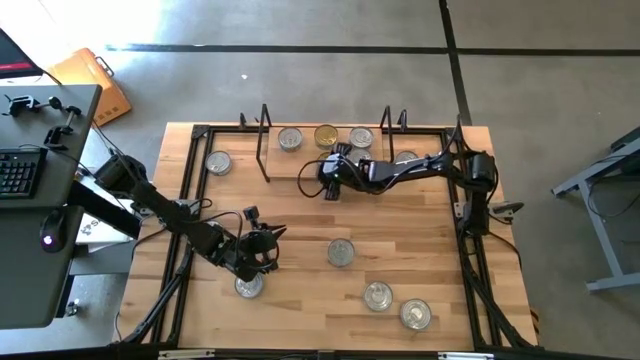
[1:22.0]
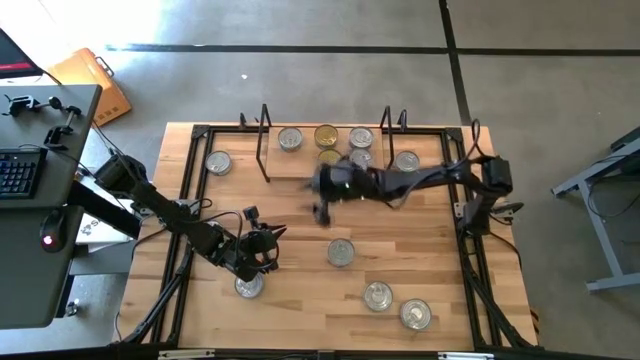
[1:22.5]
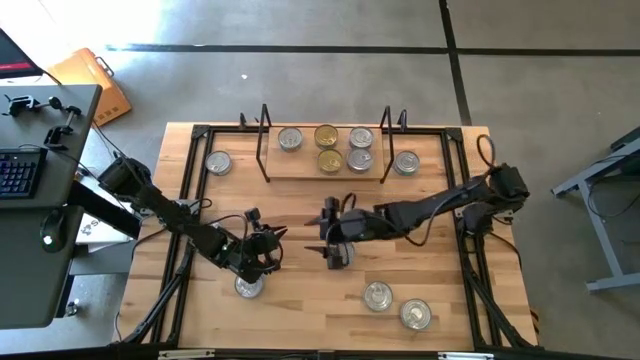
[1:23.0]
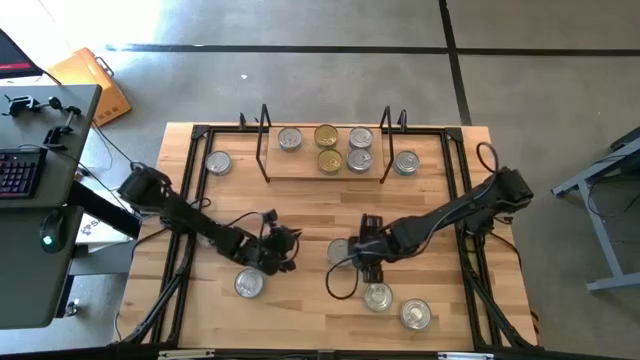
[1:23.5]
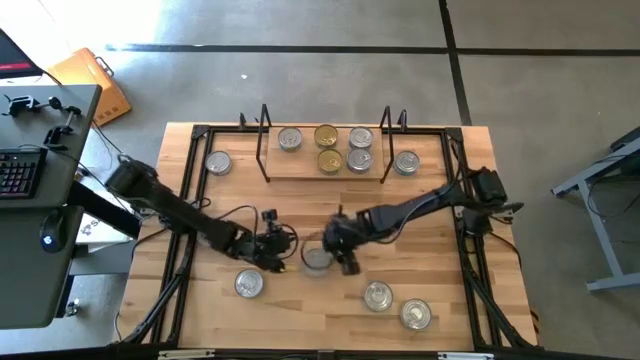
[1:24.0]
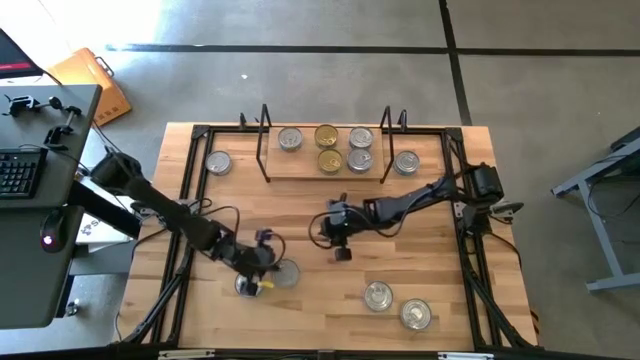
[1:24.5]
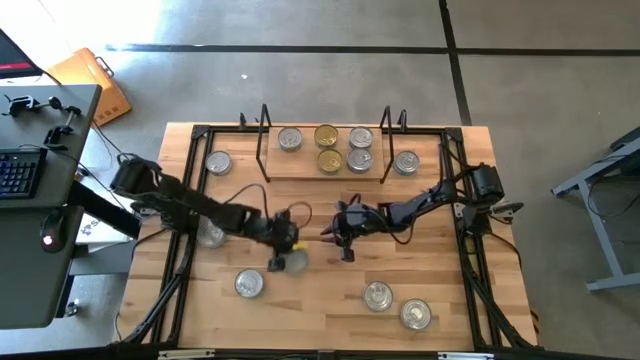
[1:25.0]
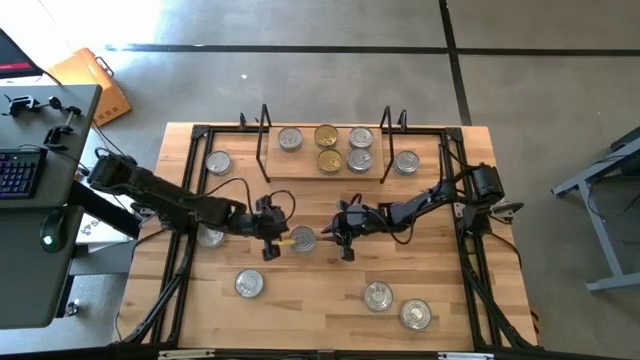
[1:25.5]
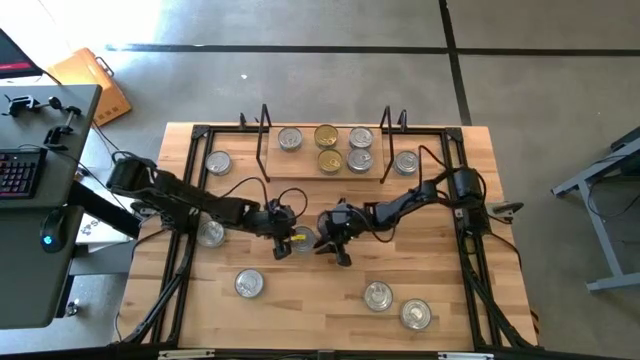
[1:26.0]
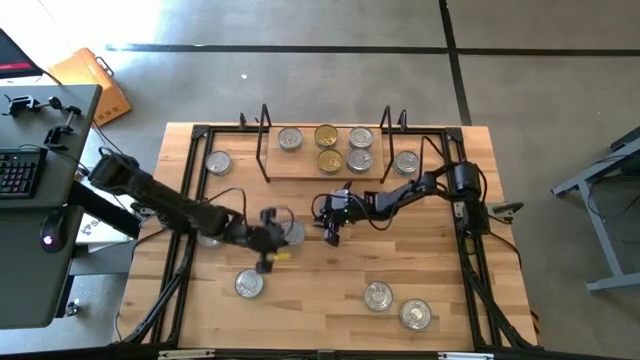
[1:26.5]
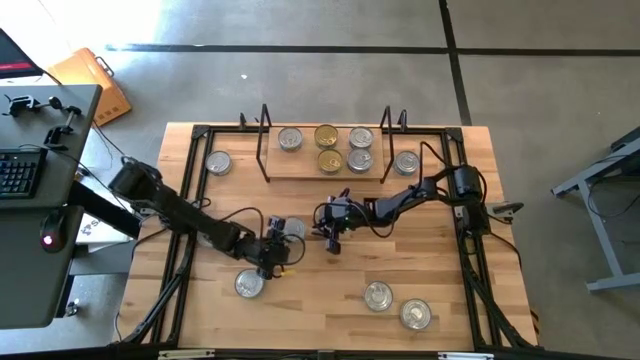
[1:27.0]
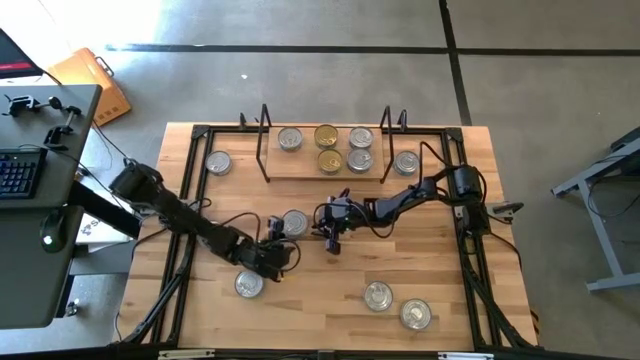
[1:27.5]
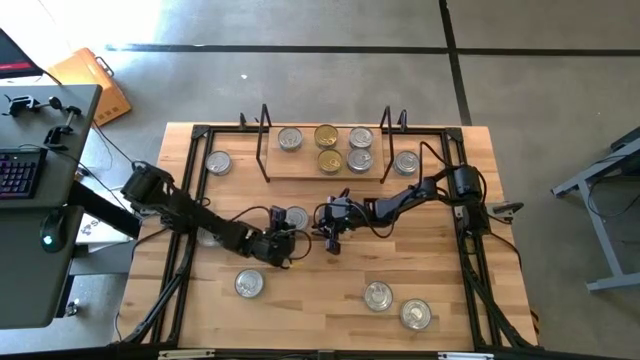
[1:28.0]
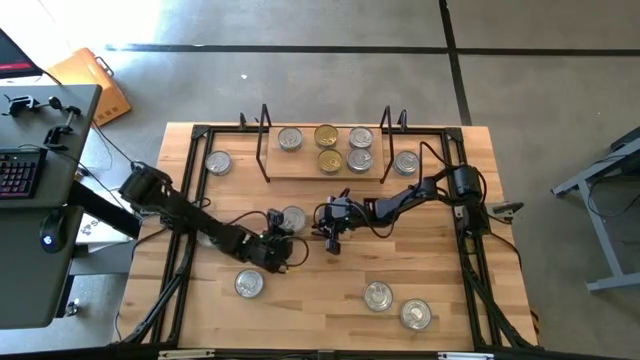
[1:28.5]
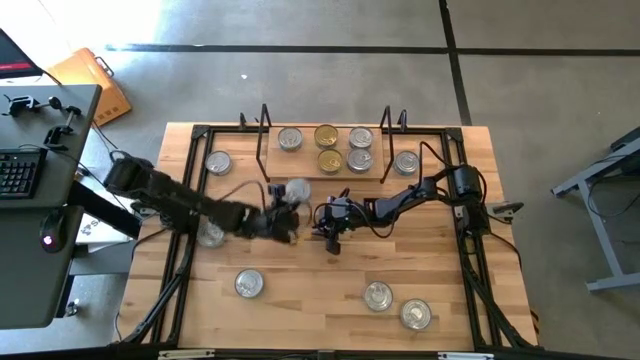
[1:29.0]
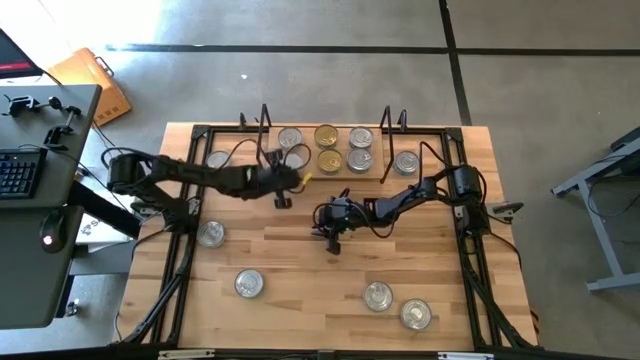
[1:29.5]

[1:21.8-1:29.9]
Task: Stack canned seafood by type on shelf
Put the yellow-blue tuna can on the shelf aligned with the other yellow-blue tuna can

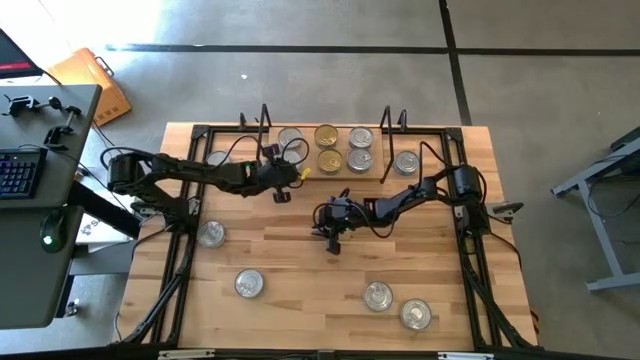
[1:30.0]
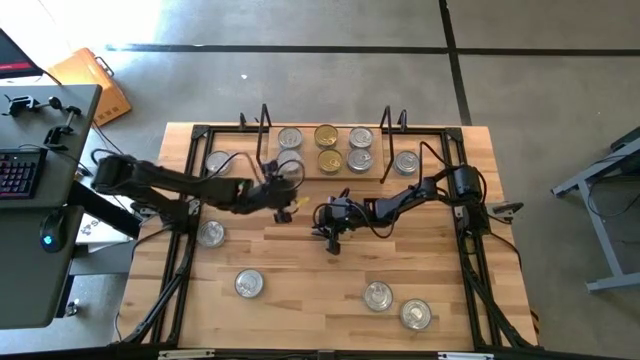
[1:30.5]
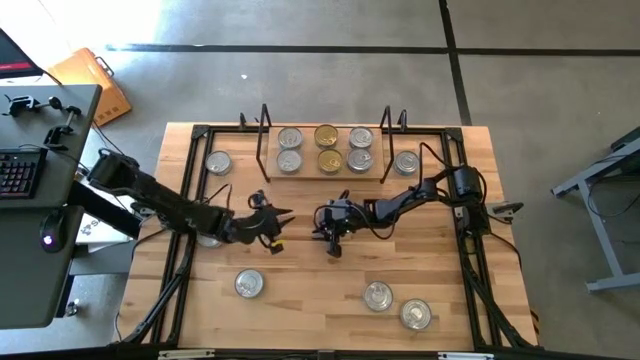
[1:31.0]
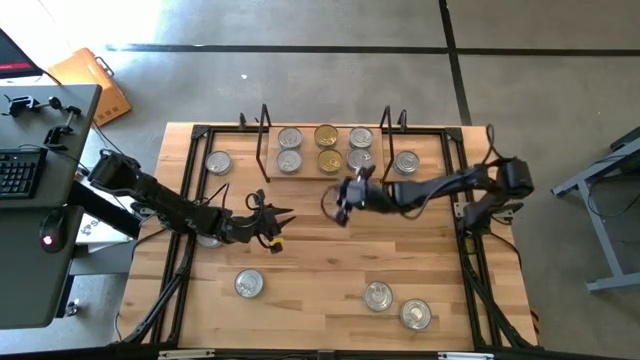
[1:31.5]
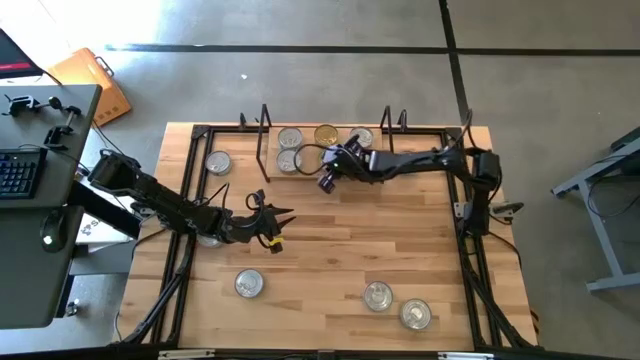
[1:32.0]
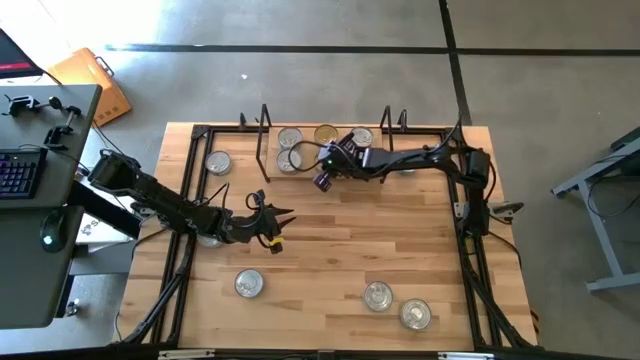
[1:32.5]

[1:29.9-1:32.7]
Adjust the green tuna can

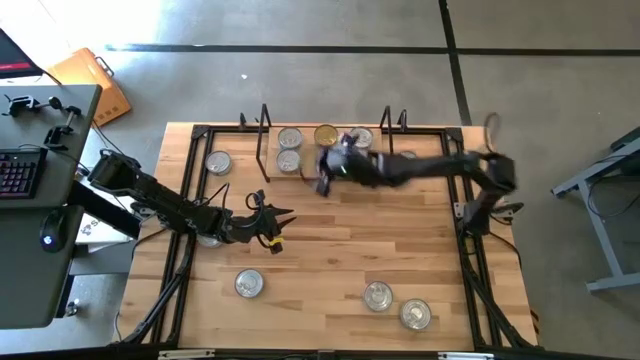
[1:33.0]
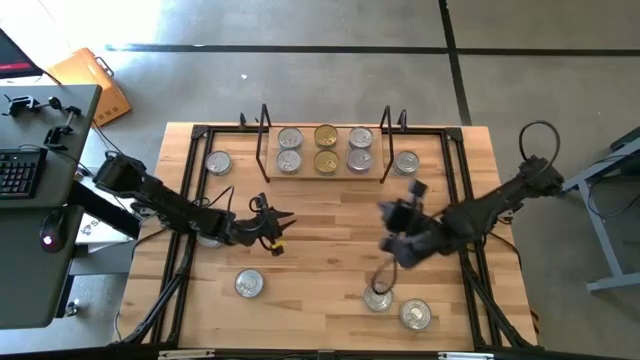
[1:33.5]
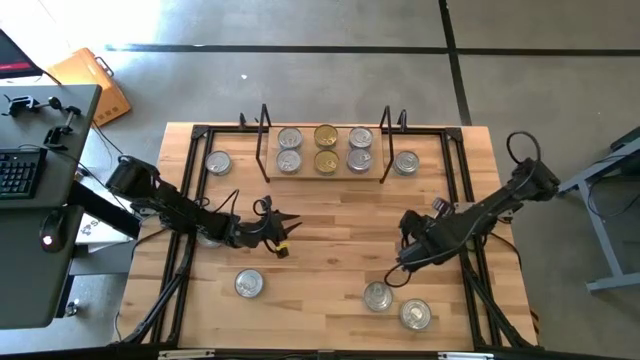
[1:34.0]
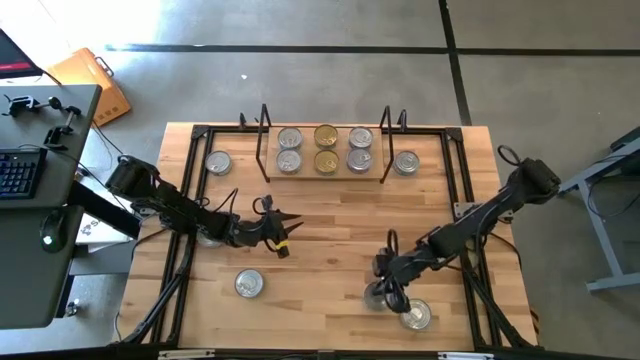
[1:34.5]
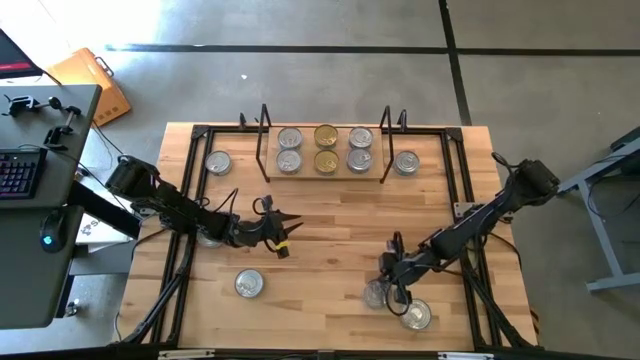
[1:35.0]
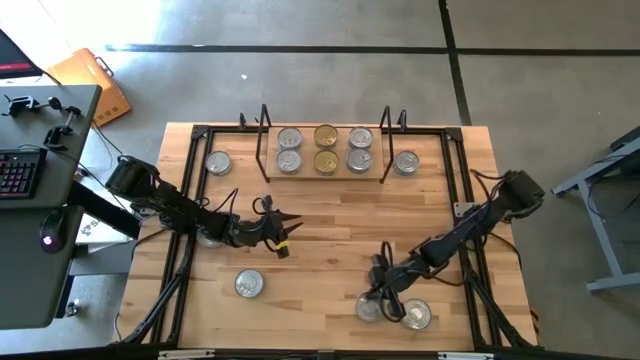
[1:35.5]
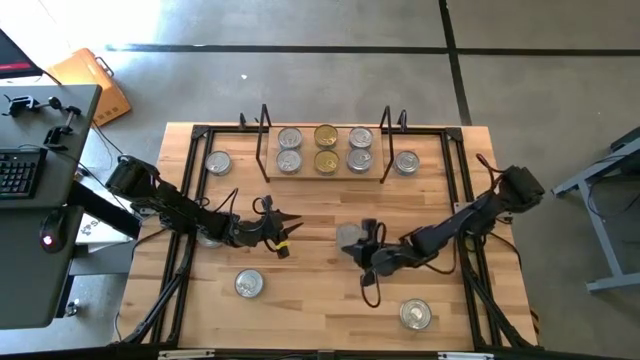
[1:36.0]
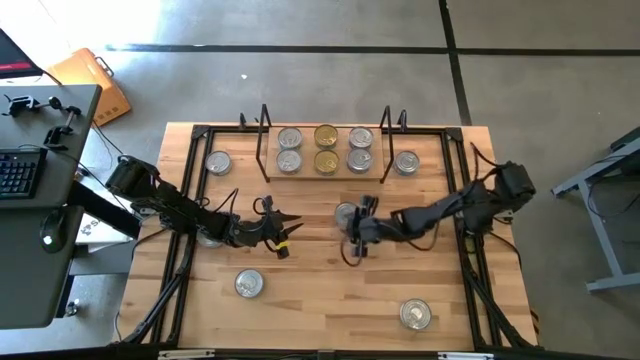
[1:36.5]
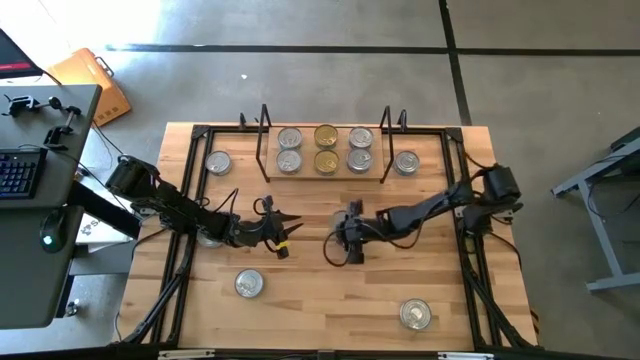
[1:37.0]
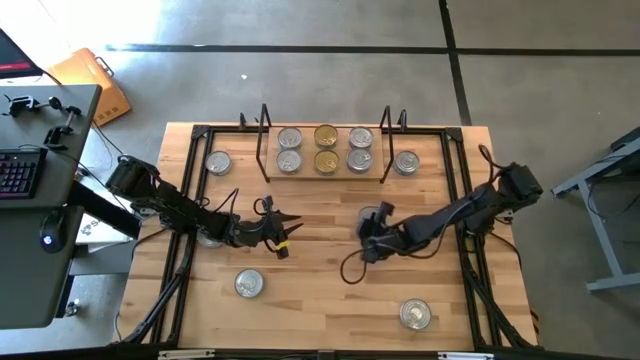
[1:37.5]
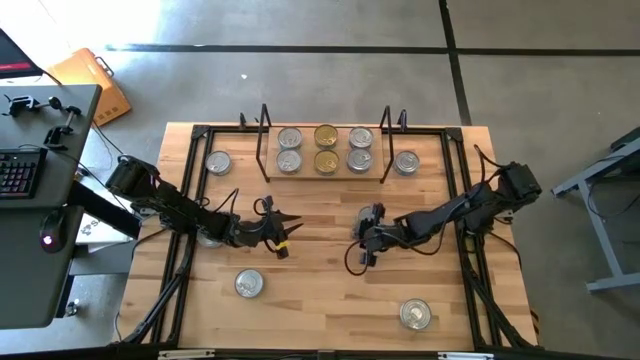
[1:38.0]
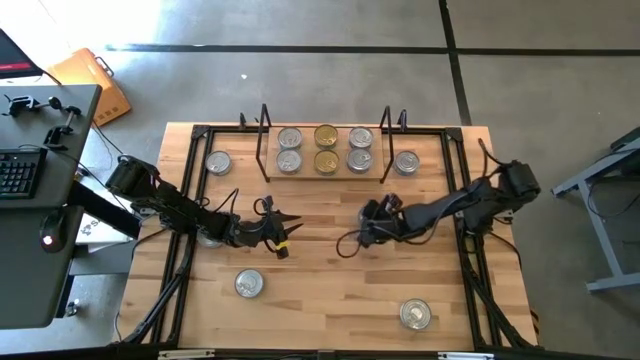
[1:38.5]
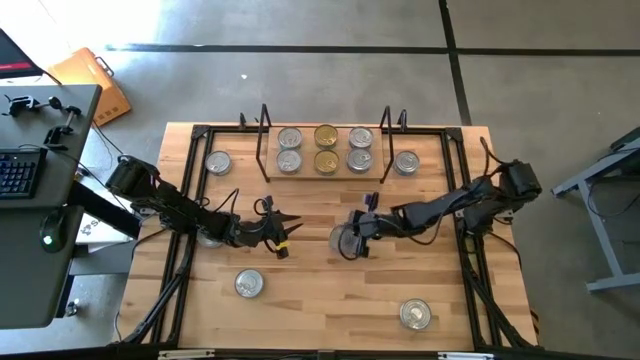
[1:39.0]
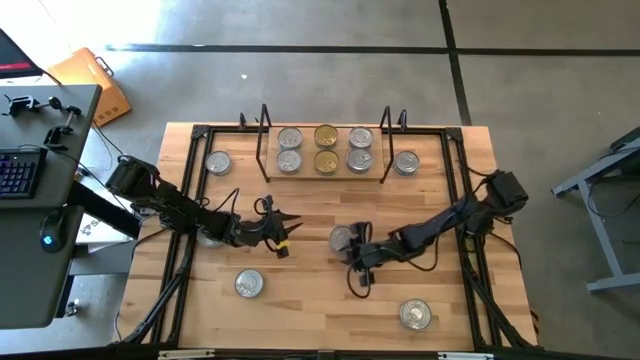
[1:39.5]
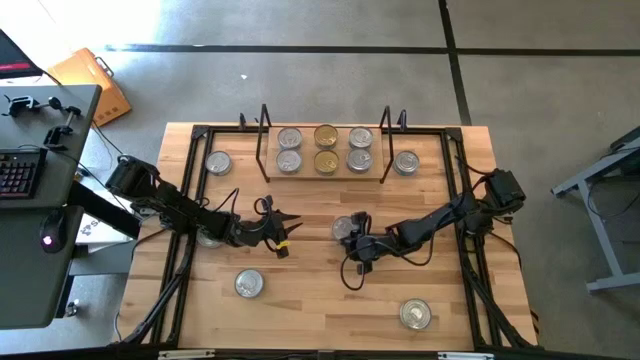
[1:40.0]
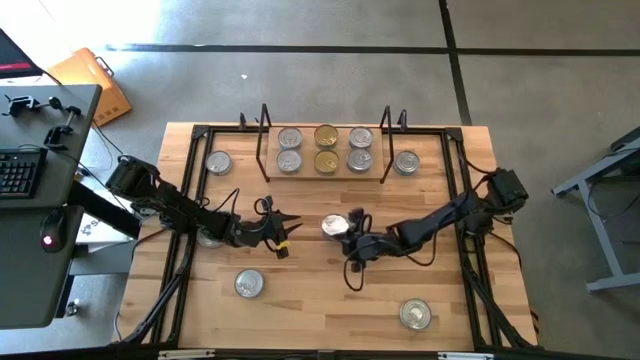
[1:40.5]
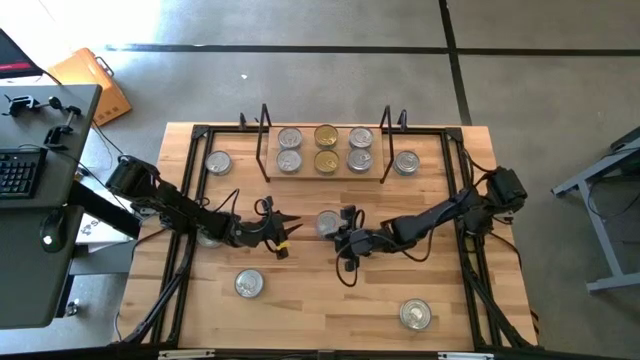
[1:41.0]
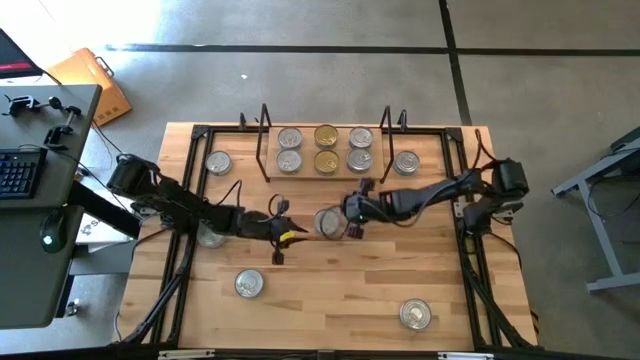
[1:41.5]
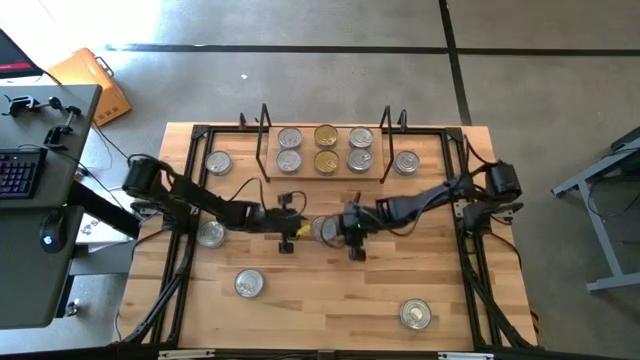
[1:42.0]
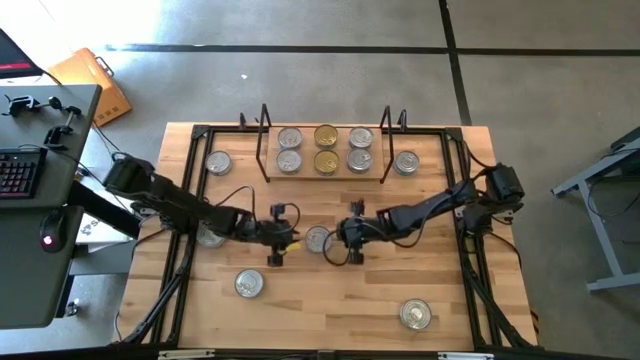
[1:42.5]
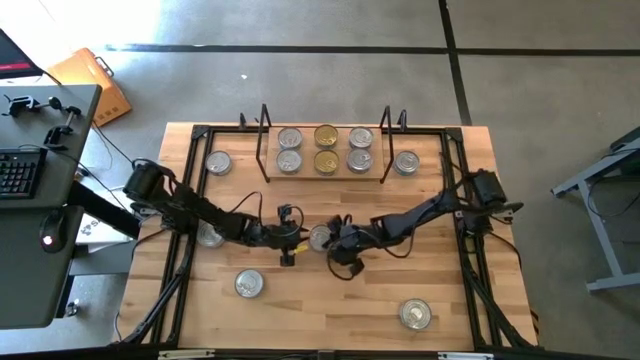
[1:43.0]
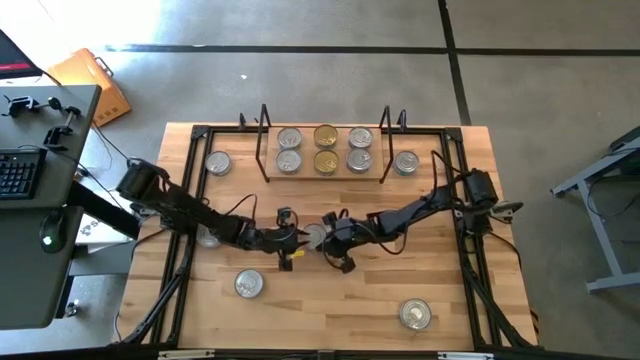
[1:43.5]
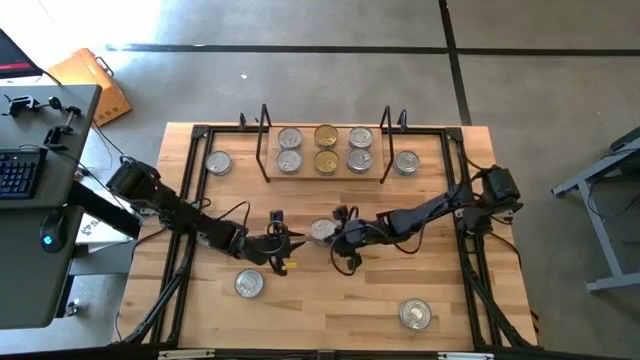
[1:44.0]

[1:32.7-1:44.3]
Stack the blue tuna can on top of the blue tuna can on the shelf
